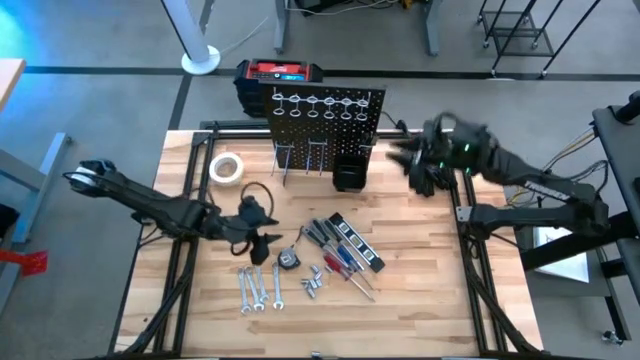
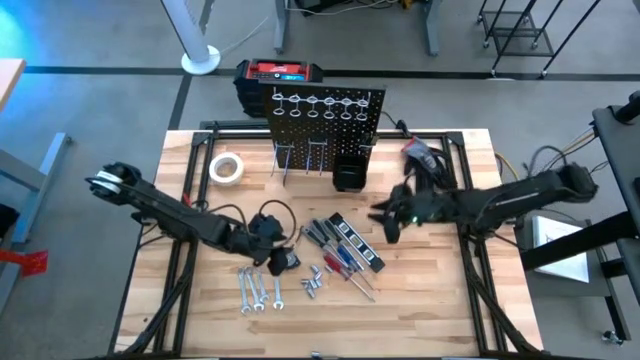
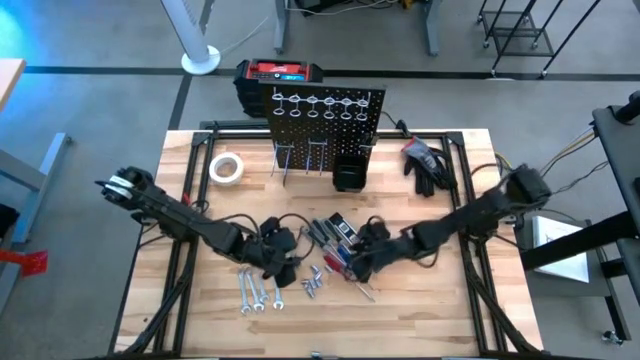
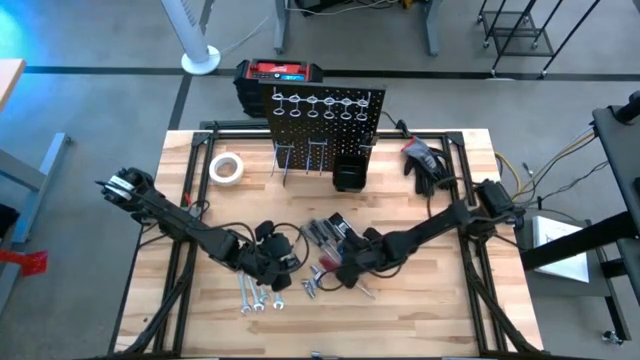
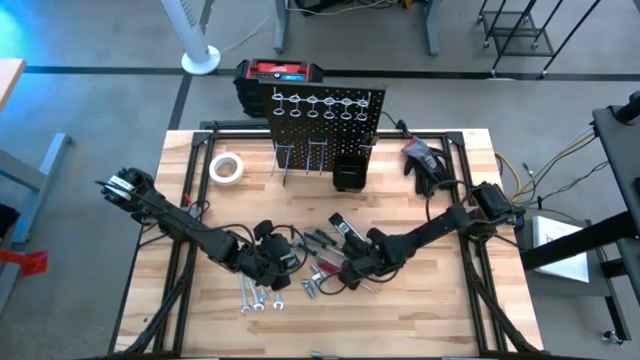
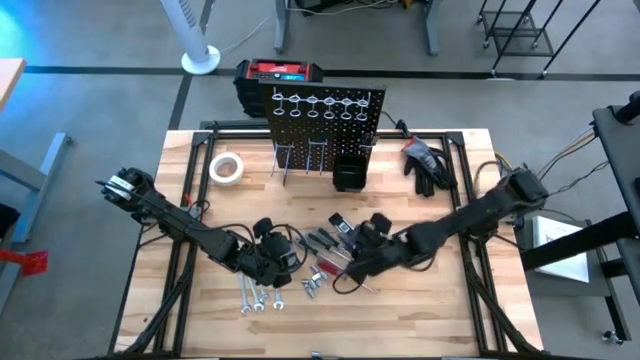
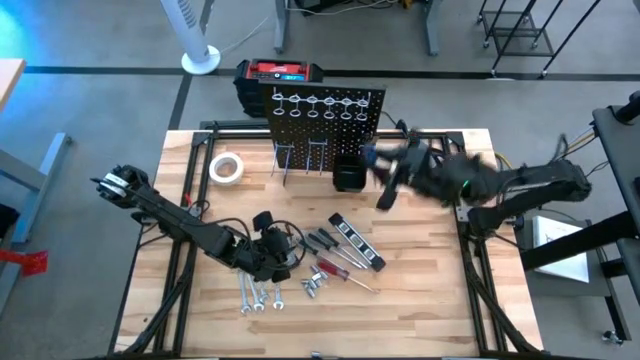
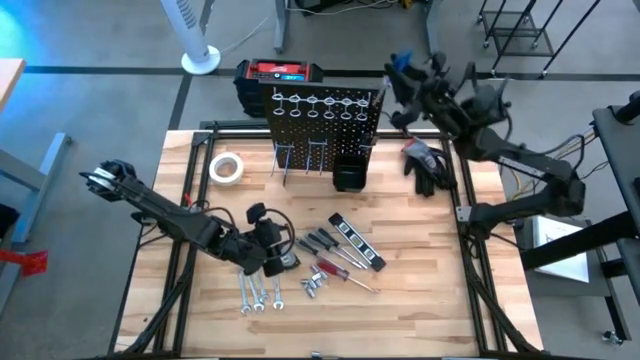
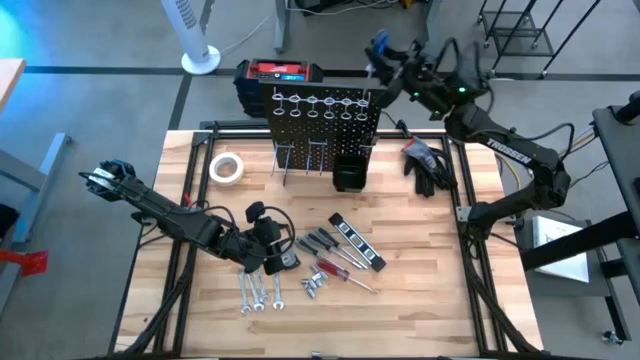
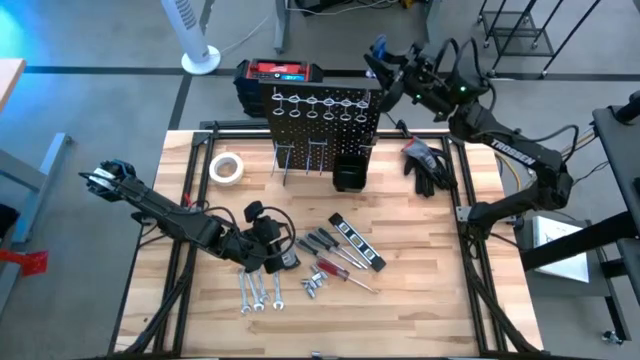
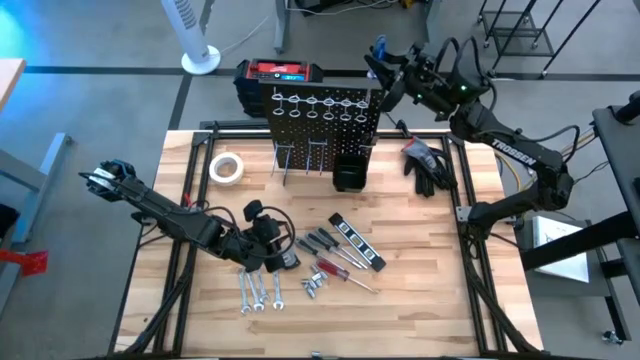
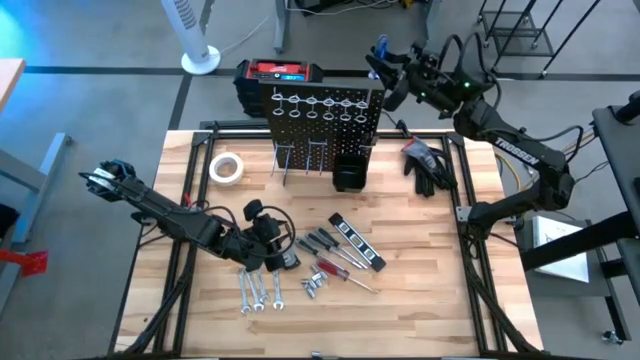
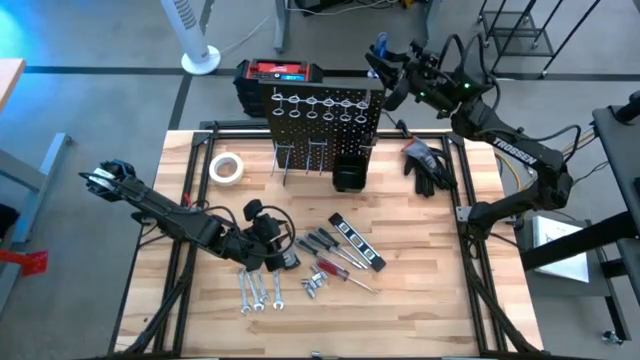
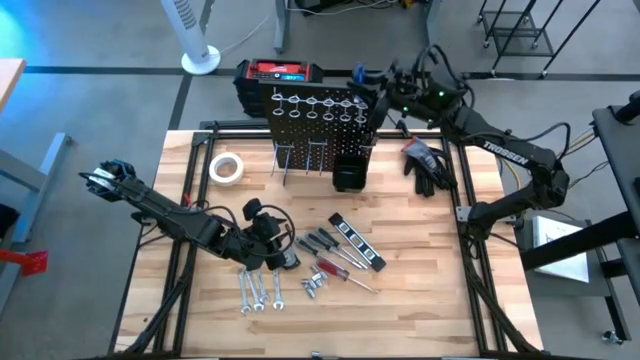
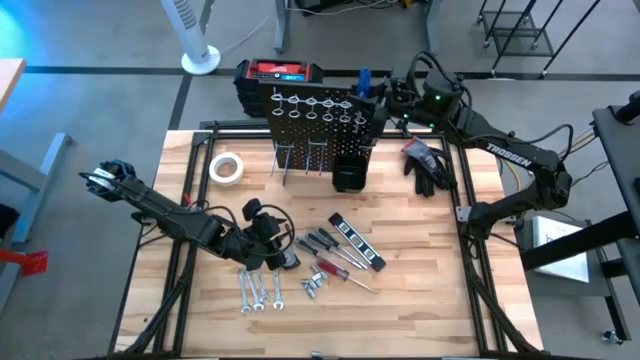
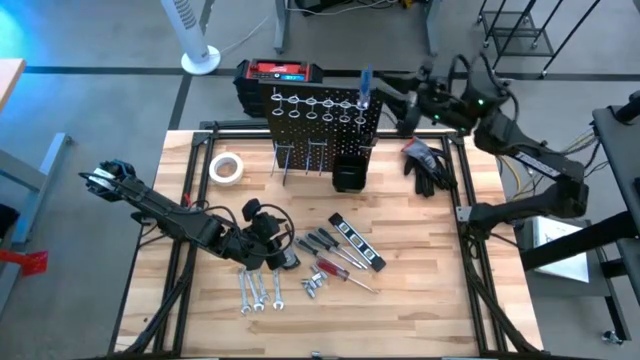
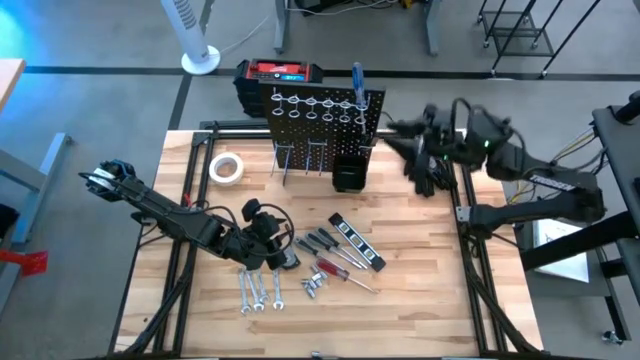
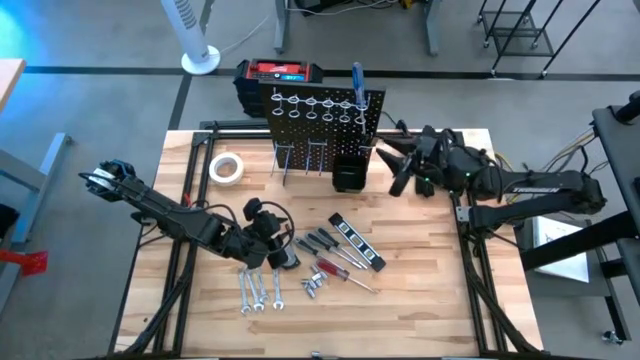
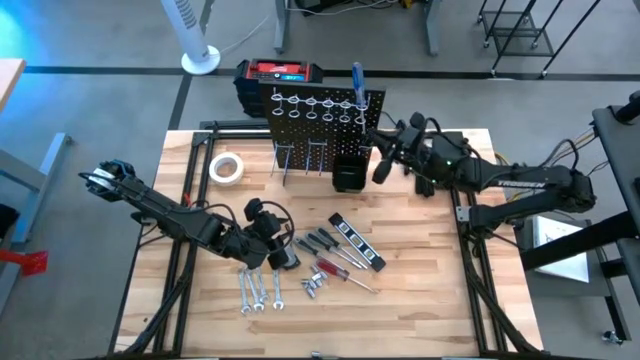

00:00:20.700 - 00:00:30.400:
Task: Hang tools onto peg board
Hang the blue screwdriver on the peg board

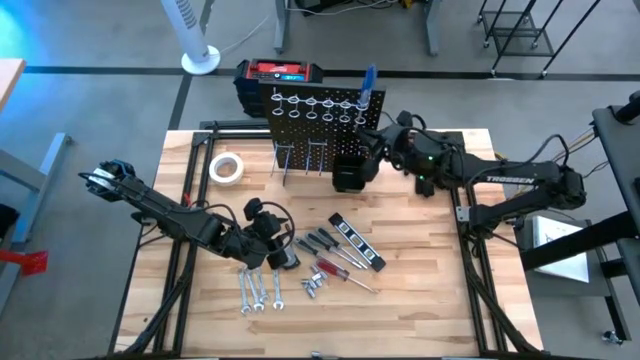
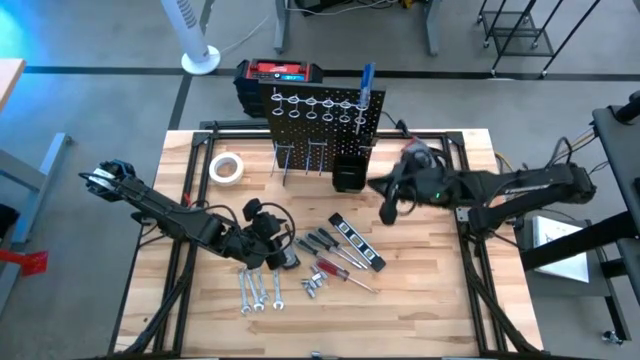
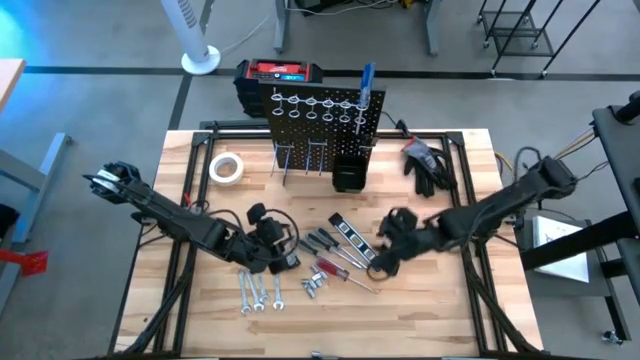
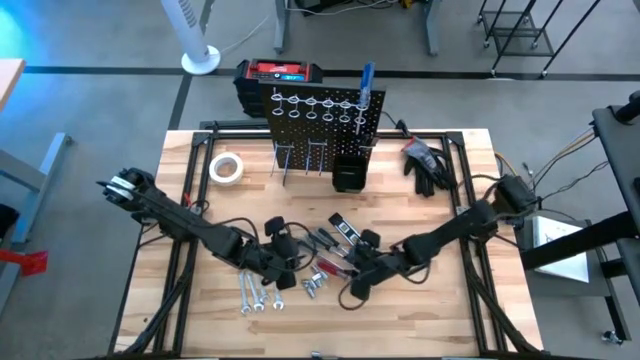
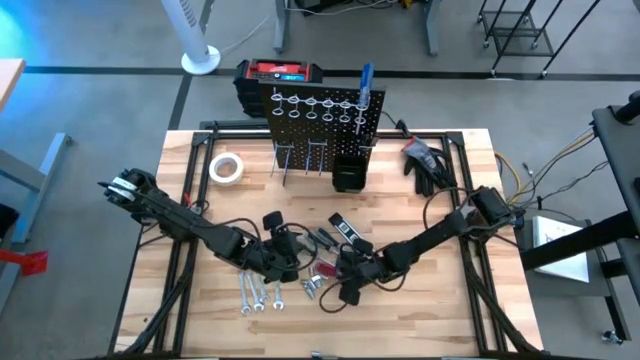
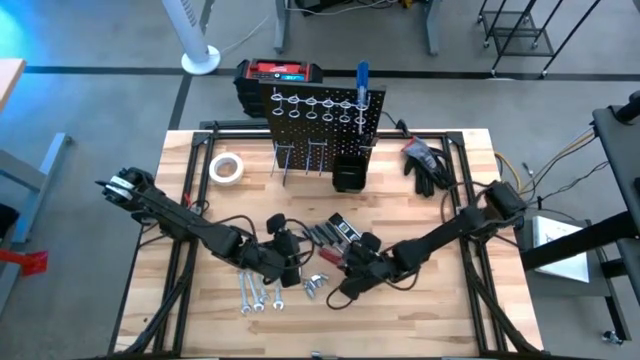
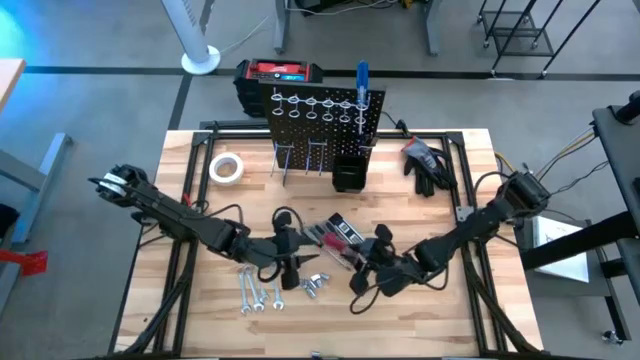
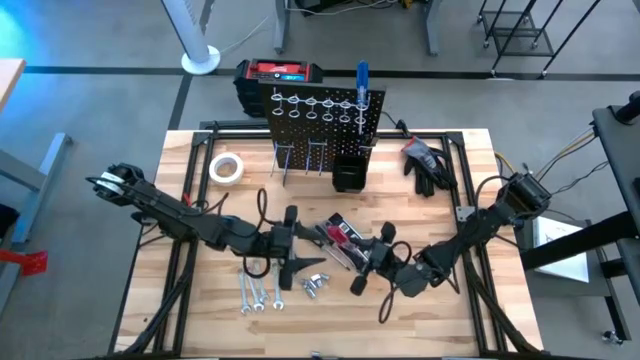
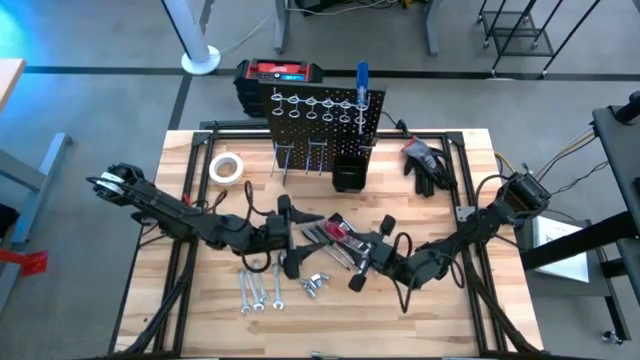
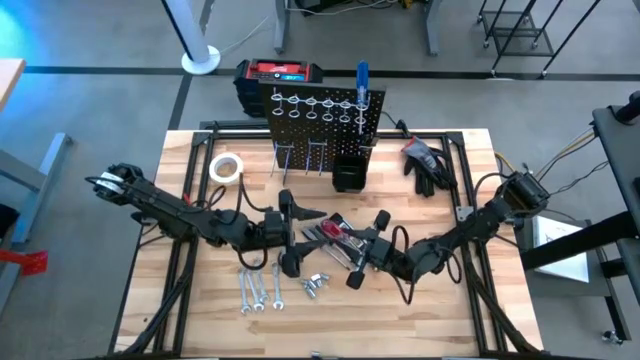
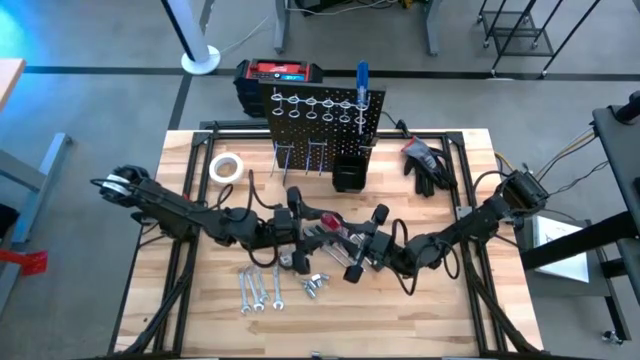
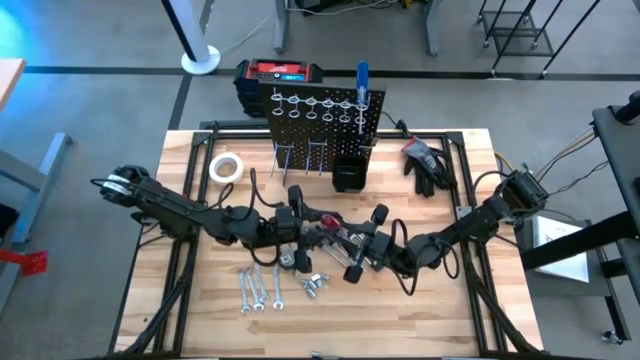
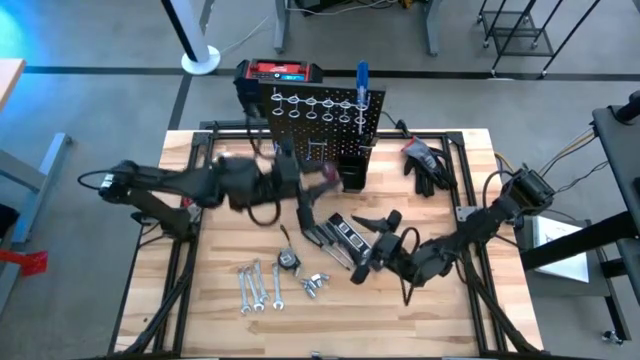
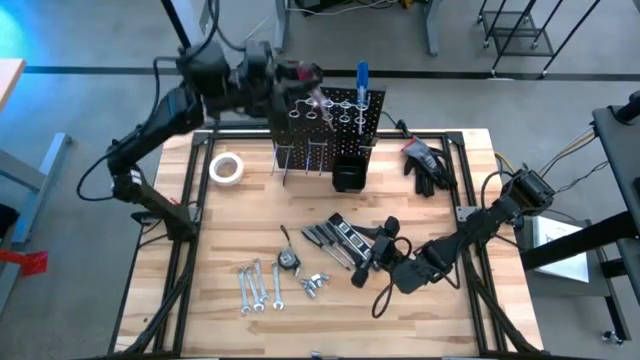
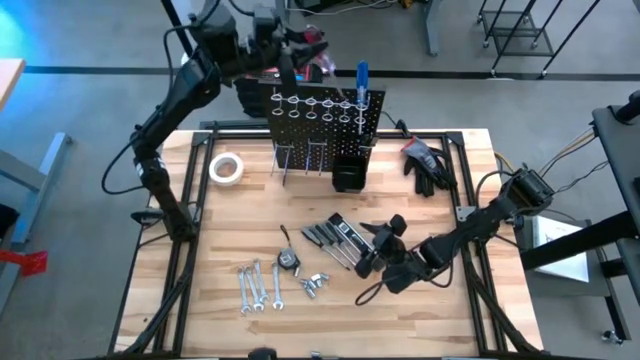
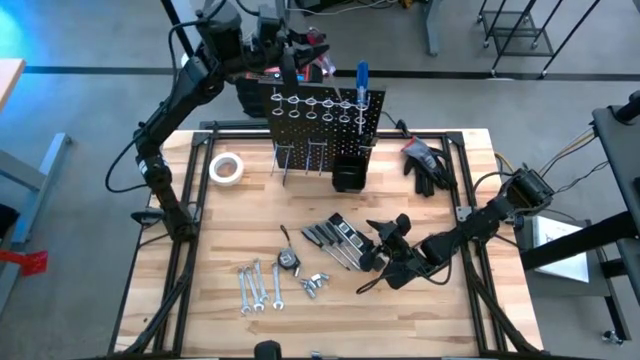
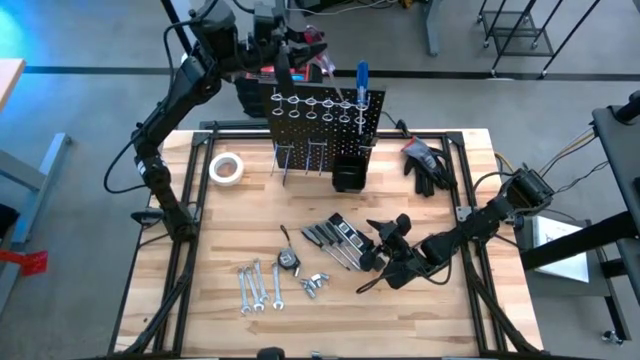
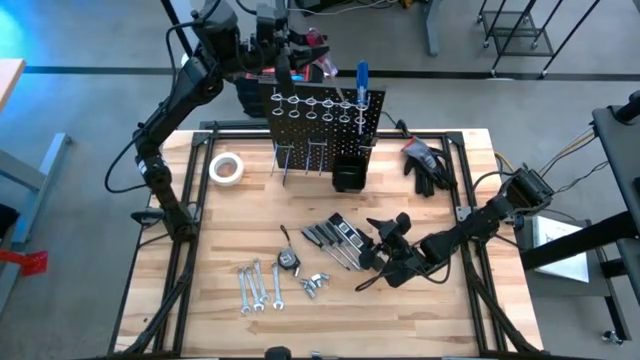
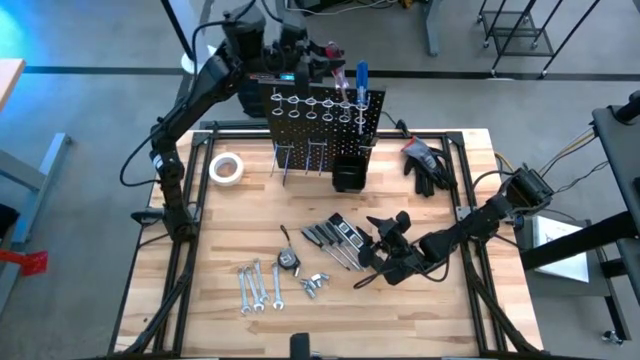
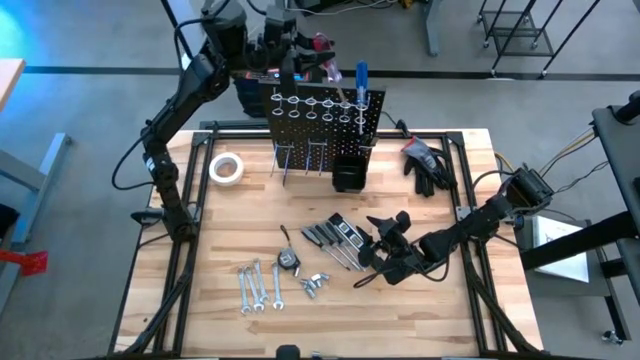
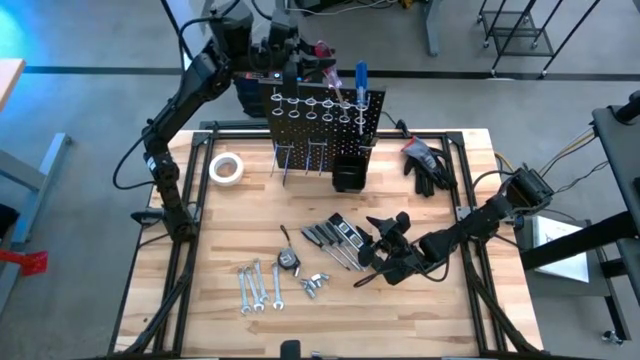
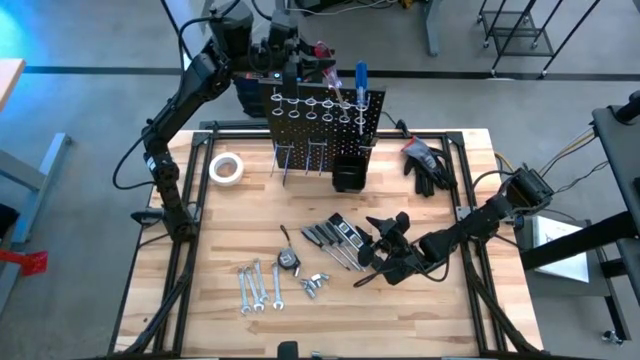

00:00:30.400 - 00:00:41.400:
Hang the red screwdriver on the peg board
